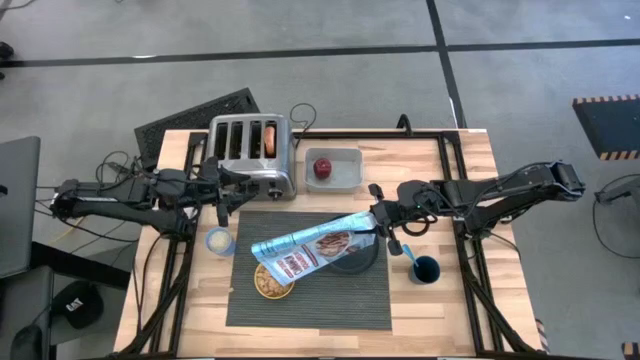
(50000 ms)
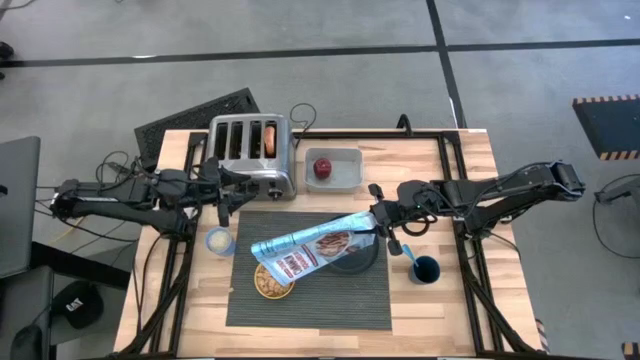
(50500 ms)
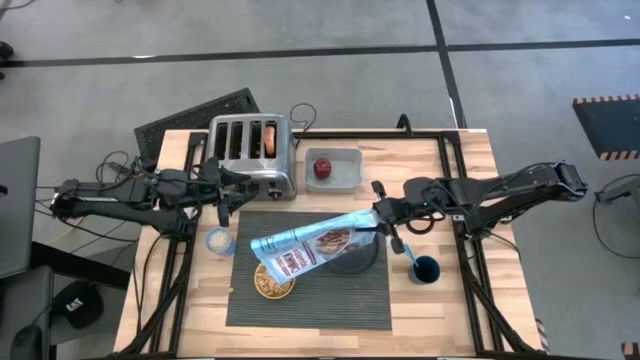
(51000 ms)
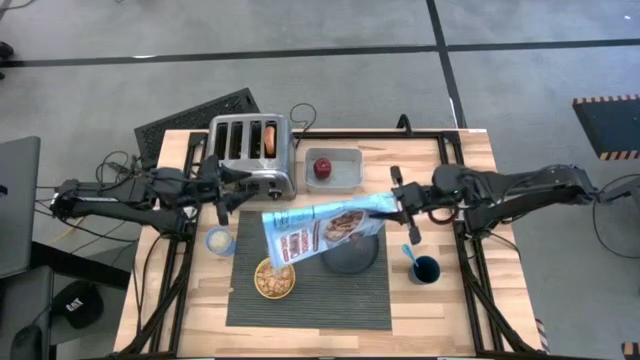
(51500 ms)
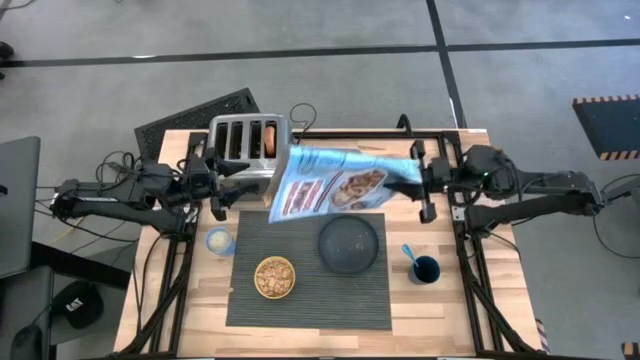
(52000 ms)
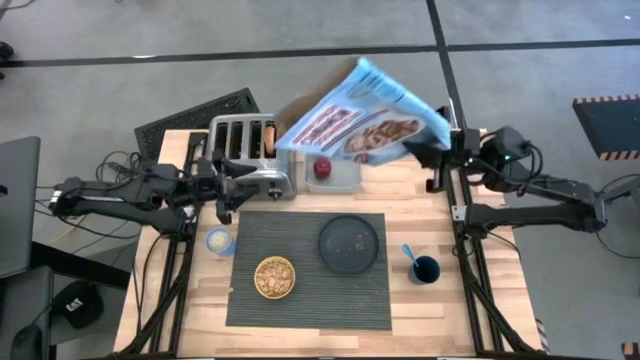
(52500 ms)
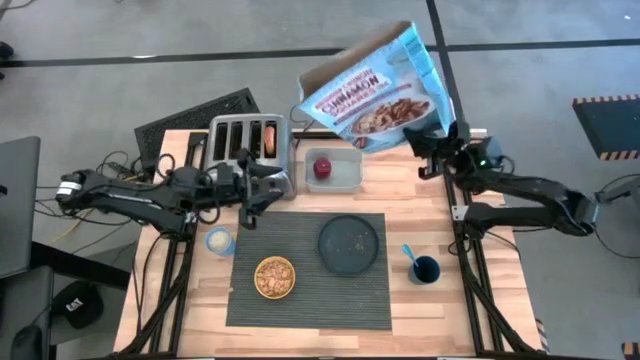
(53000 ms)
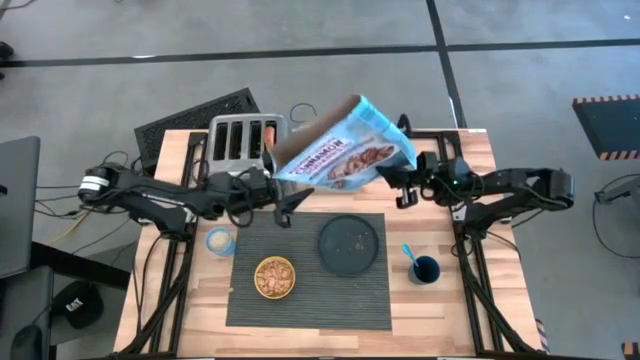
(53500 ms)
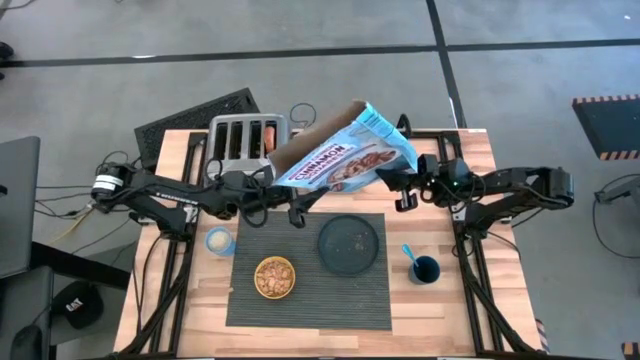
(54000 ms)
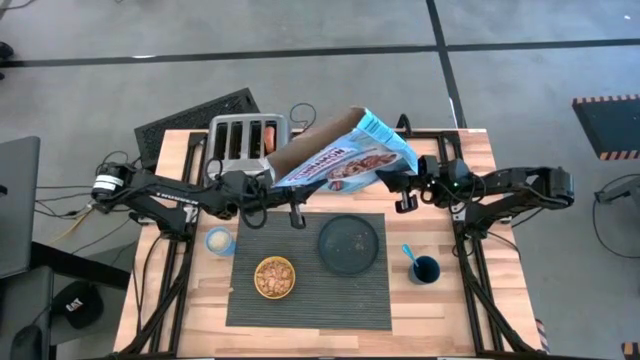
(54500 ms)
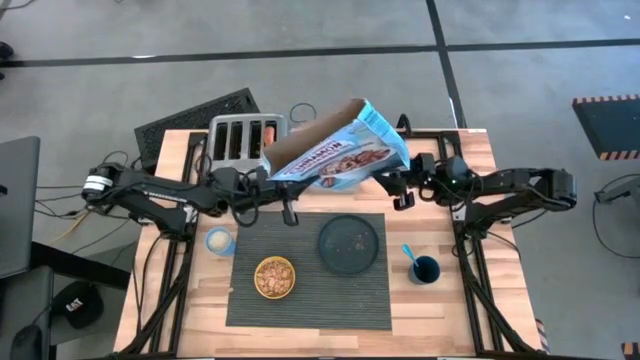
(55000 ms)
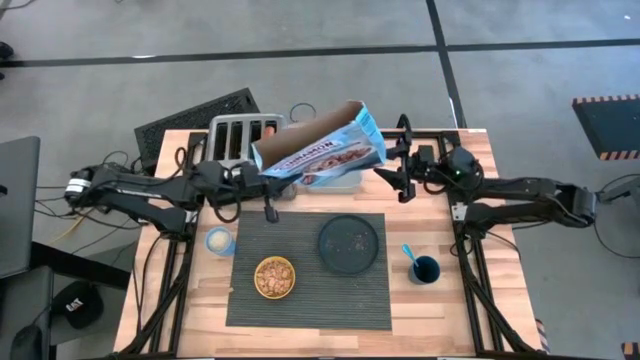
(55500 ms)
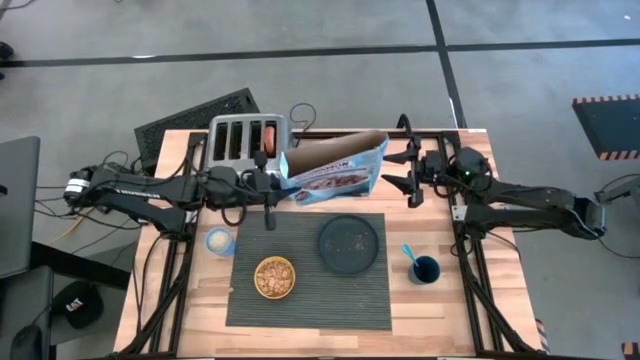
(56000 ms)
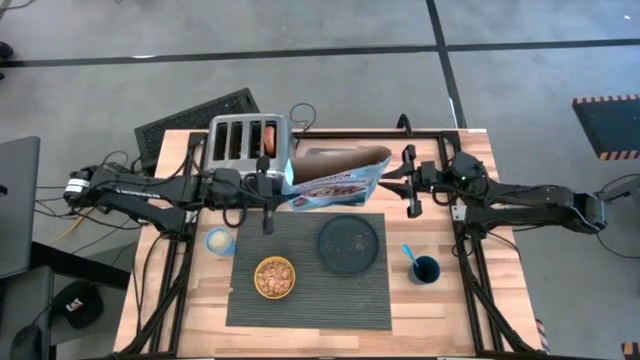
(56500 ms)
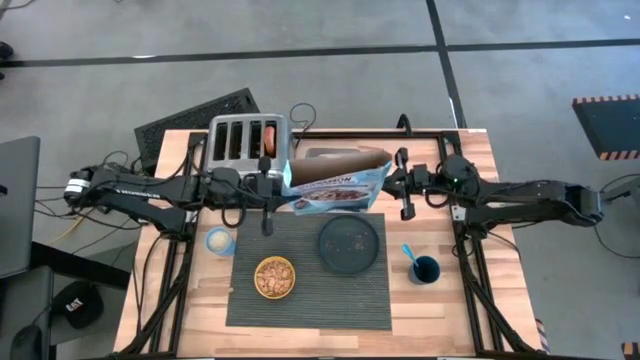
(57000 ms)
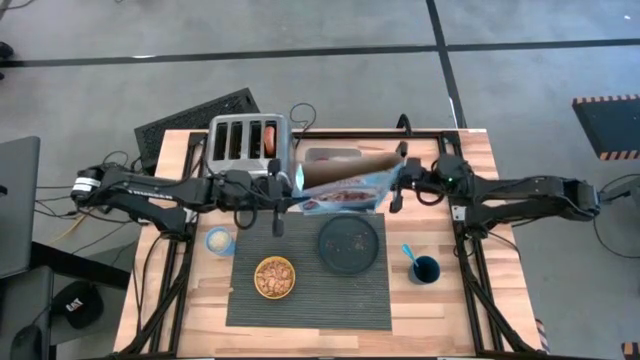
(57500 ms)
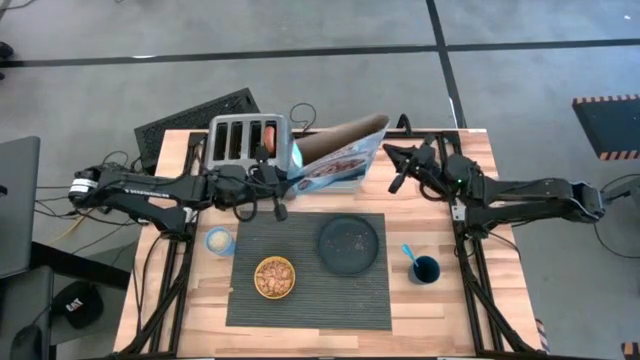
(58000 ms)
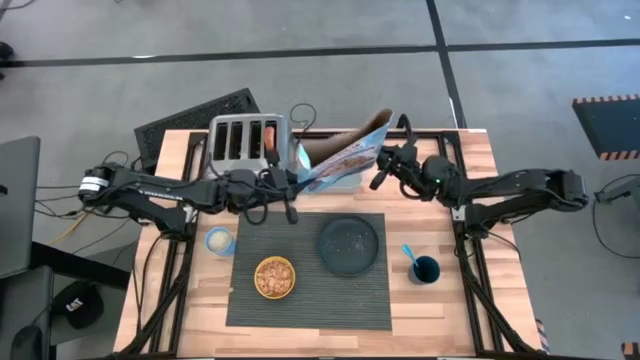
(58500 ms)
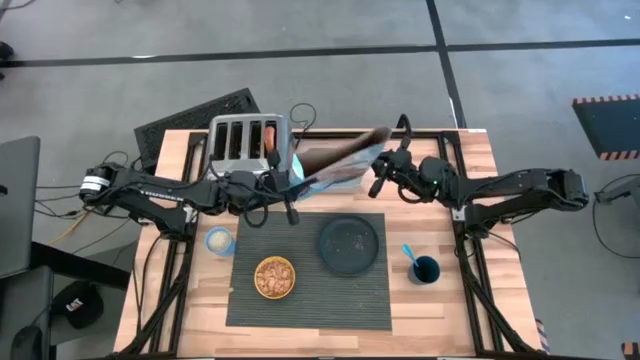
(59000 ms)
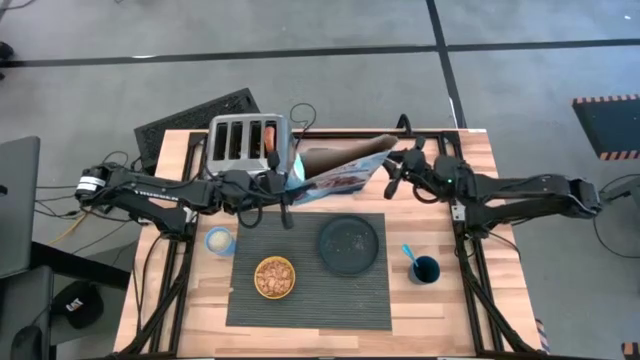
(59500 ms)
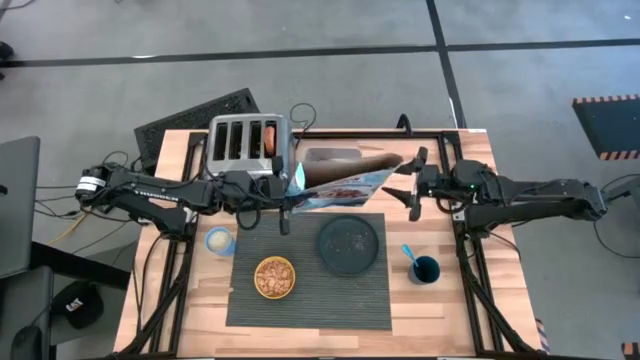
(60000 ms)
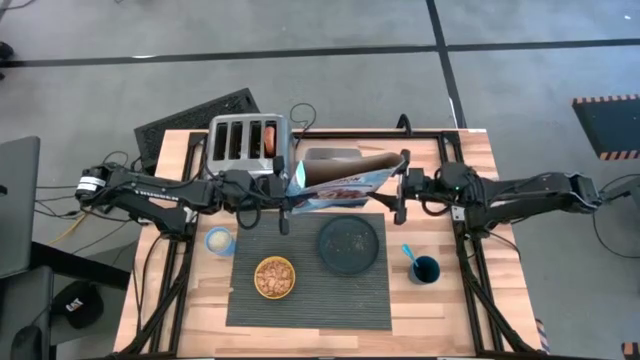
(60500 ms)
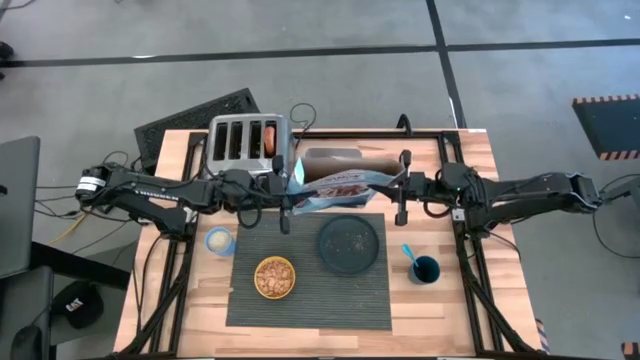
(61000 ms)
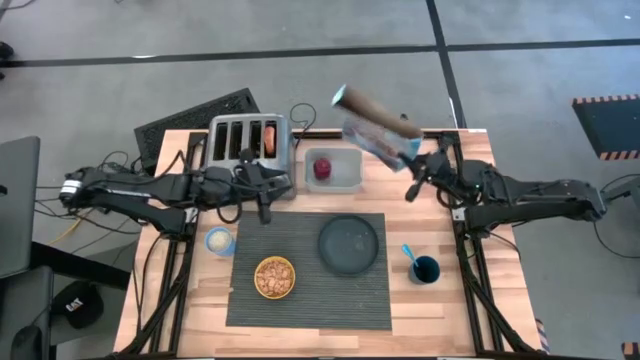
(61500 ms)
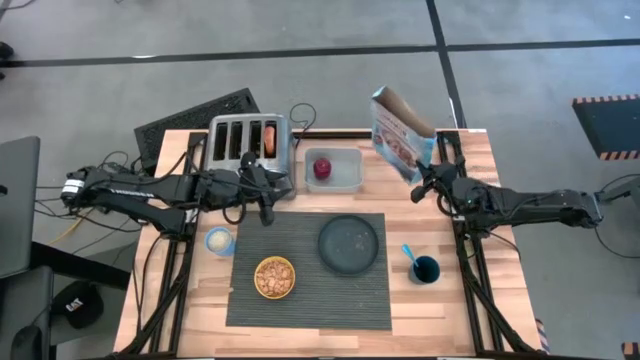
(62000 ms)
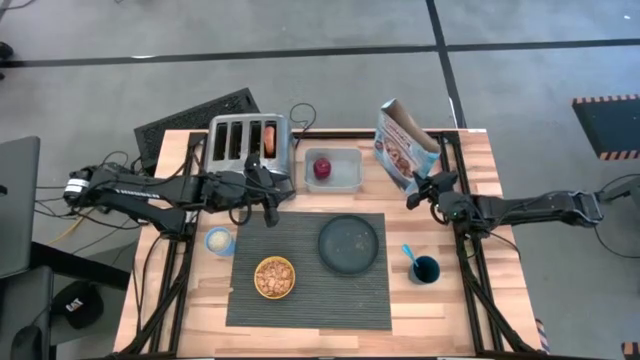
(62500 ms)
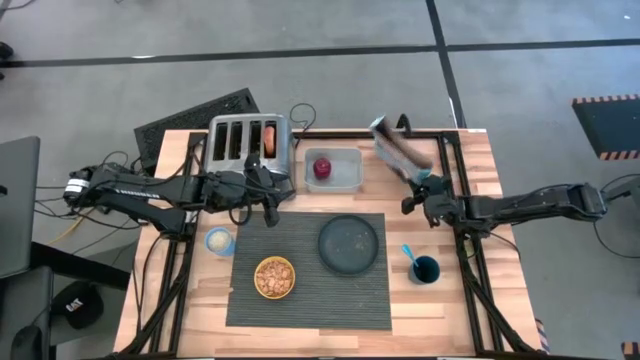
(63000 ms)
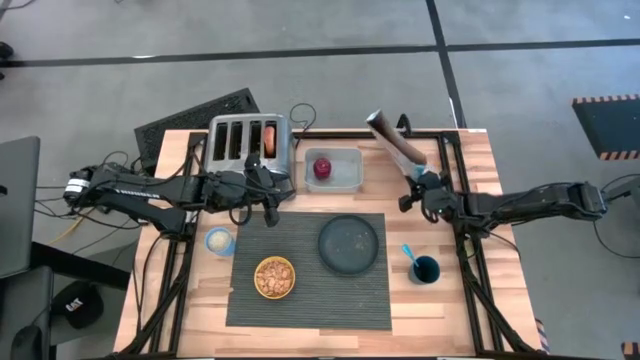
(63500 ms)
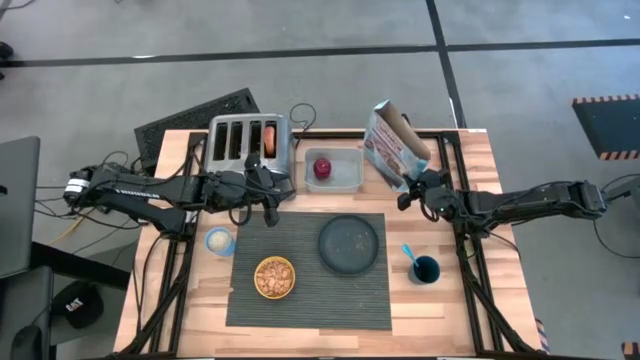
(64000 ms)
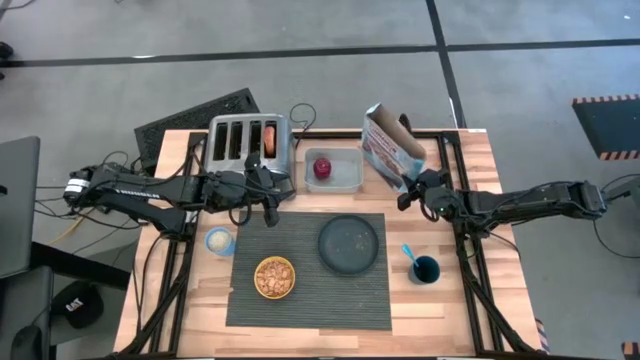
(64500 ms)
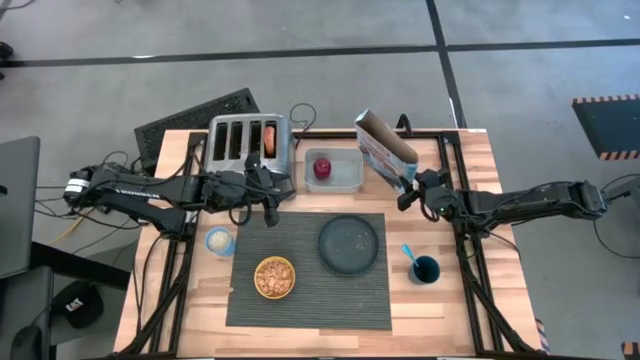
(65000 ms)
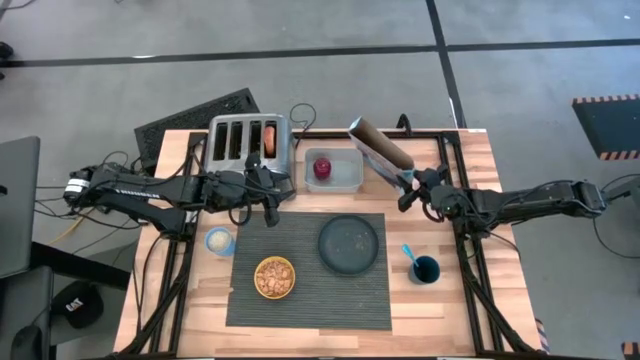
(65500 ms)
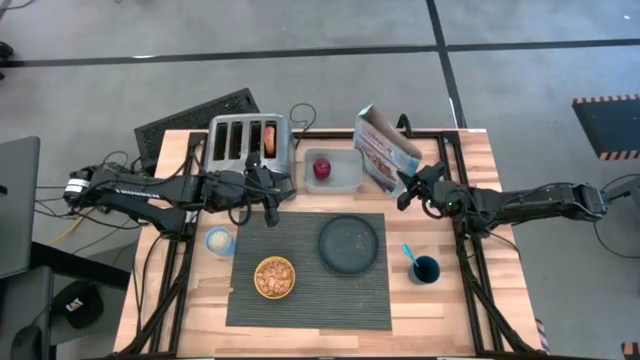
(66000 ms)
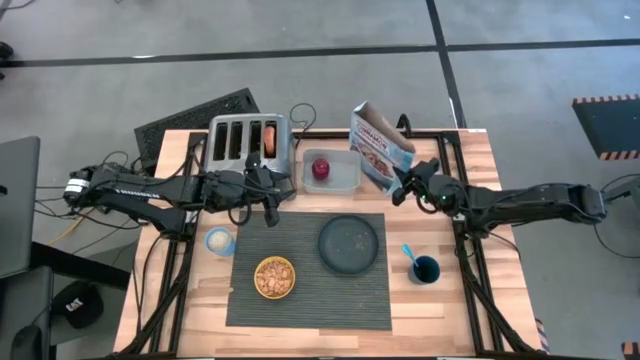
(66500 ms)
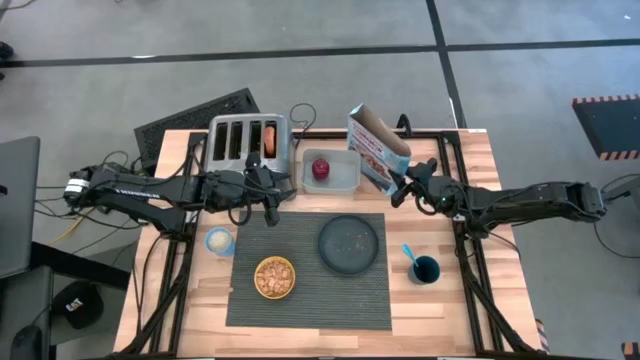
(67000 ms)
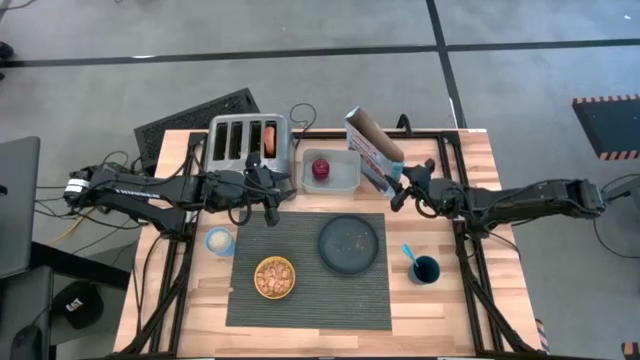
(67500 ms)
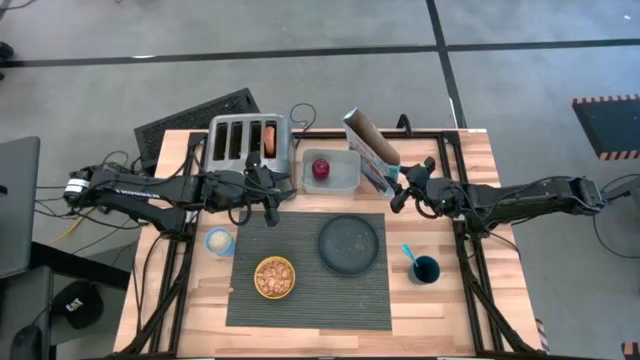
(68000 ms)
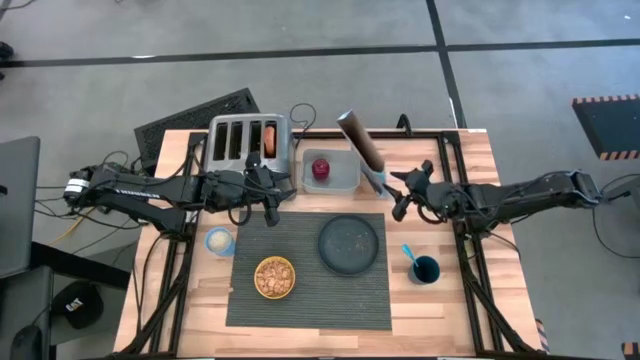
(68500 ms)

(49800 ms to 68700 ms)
Task: Arrange a breakfast setting
Pour the cereal from the blue cereal box into the yellow patterned bowl

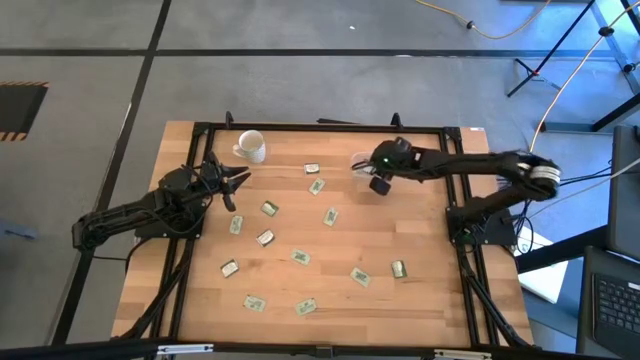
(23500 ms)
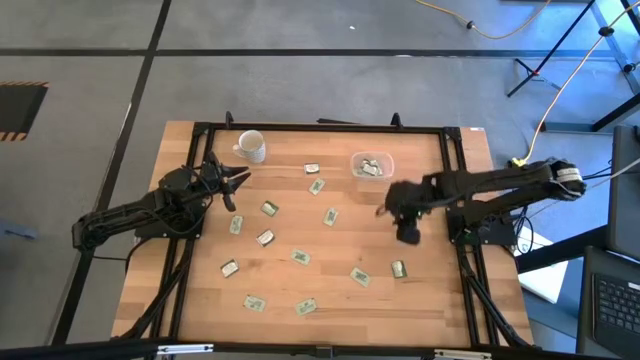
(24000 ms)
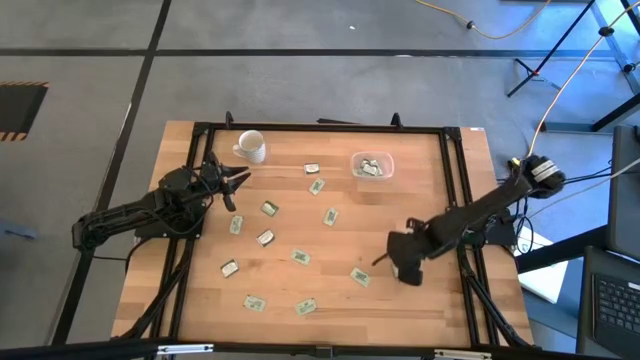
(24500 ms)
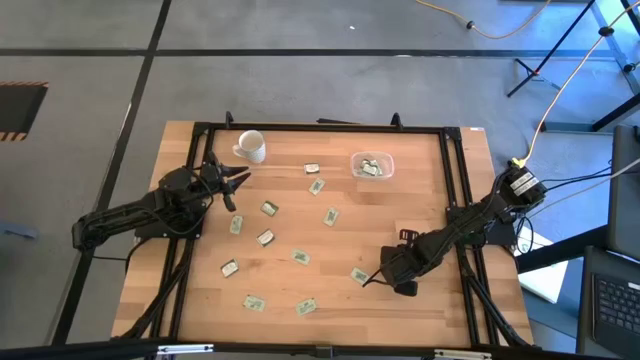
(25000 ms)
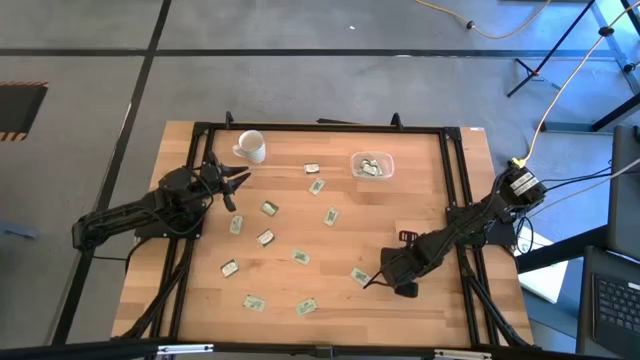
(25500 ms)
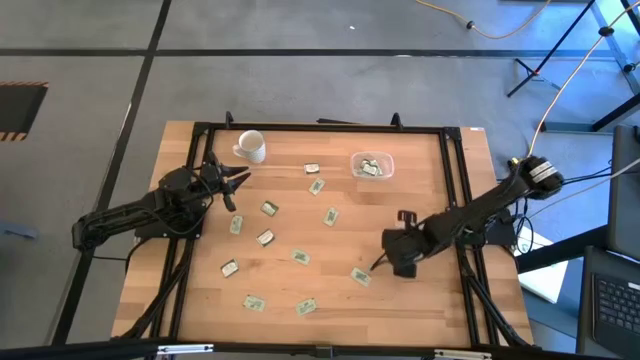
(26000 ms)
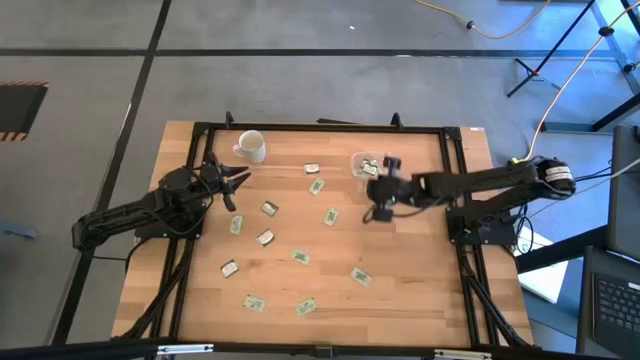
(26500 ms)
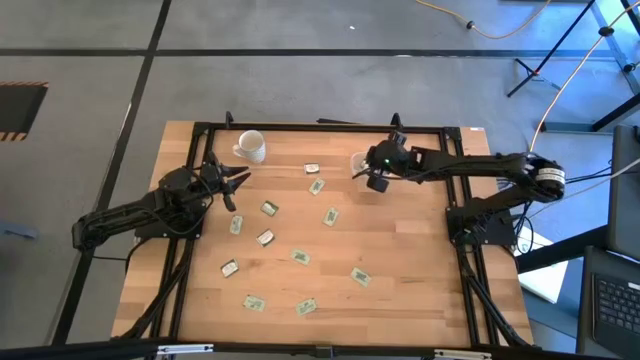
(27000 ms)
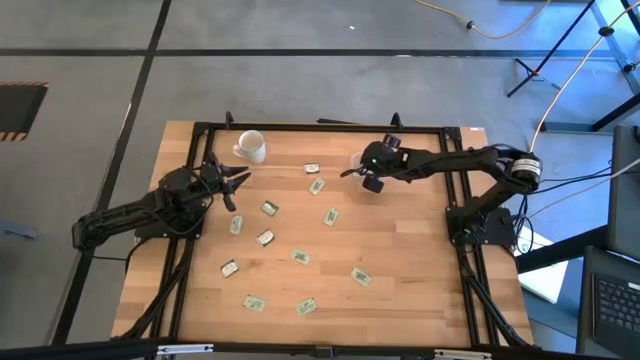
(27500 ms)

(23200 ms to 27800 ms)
Task: Pick and place items into bin
Put the truvia packet into the transparent bin
